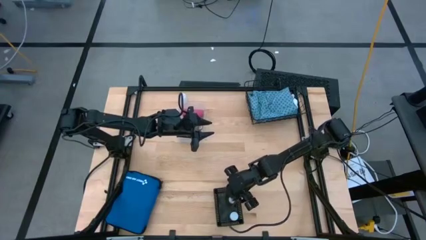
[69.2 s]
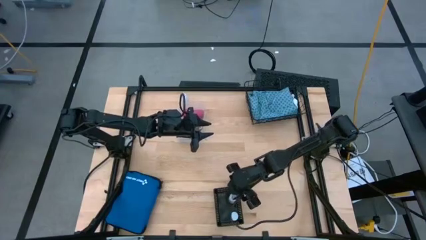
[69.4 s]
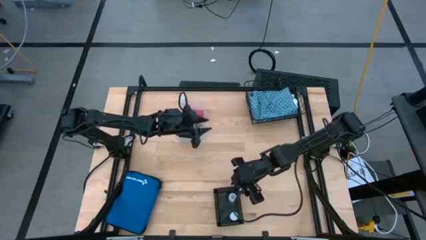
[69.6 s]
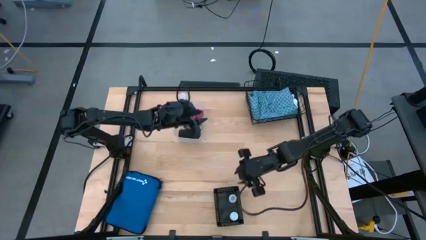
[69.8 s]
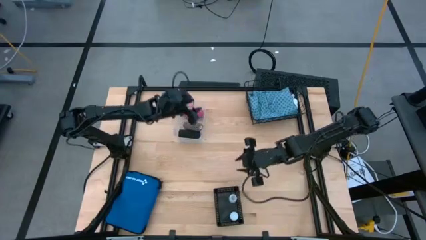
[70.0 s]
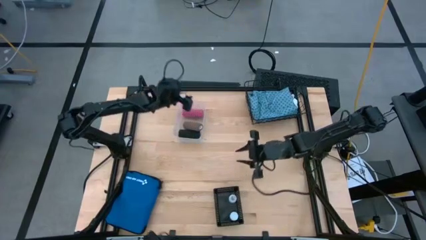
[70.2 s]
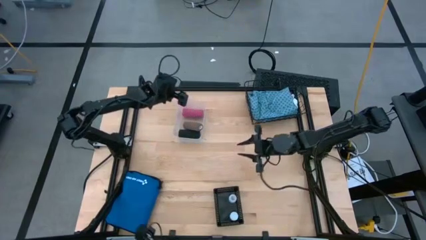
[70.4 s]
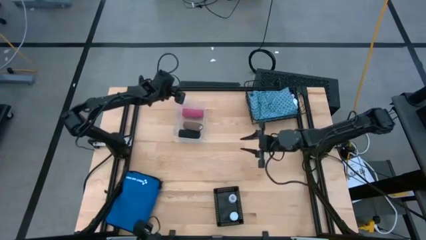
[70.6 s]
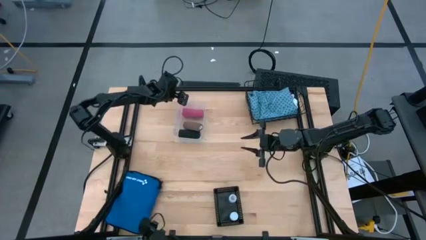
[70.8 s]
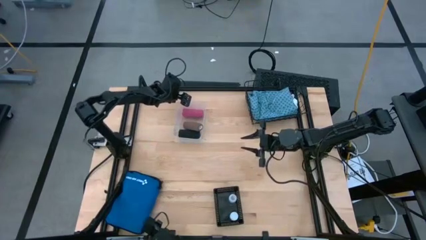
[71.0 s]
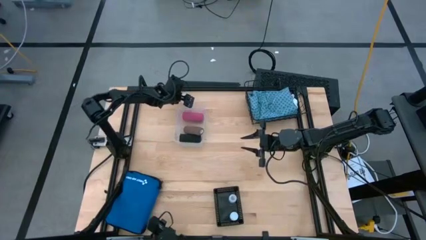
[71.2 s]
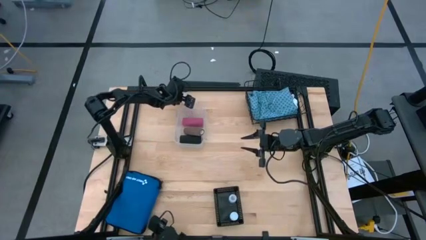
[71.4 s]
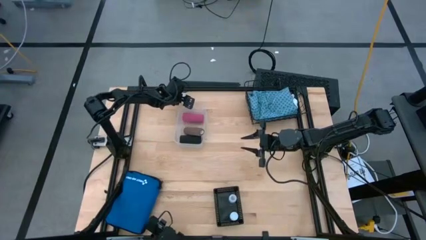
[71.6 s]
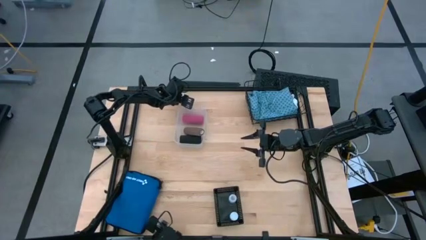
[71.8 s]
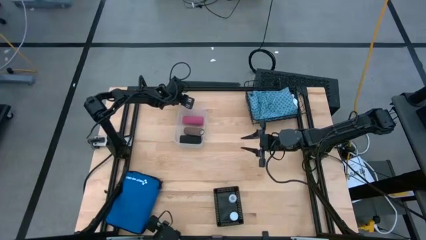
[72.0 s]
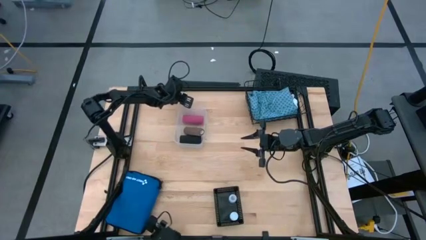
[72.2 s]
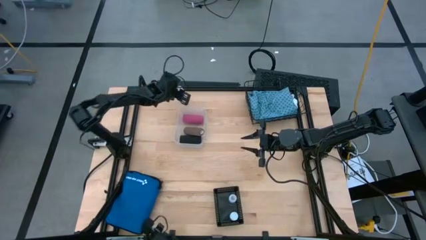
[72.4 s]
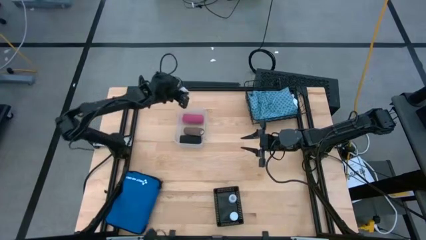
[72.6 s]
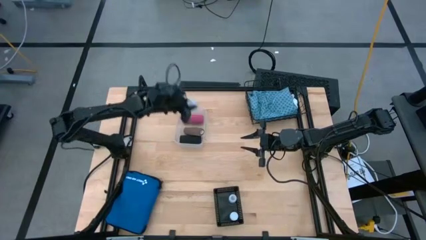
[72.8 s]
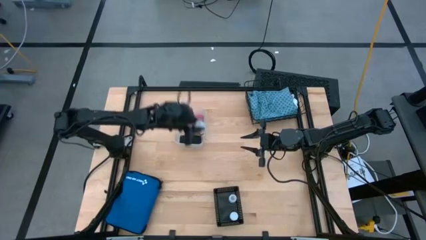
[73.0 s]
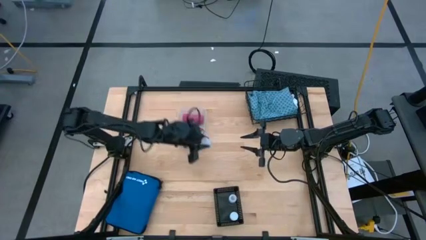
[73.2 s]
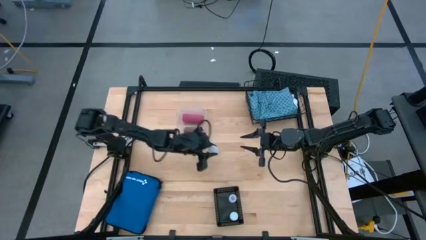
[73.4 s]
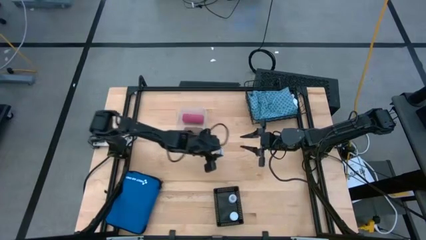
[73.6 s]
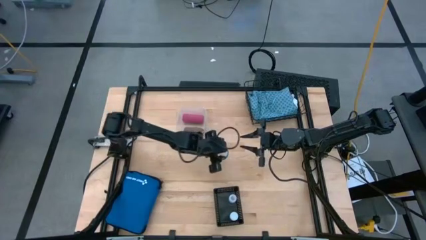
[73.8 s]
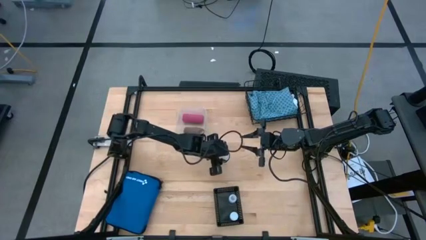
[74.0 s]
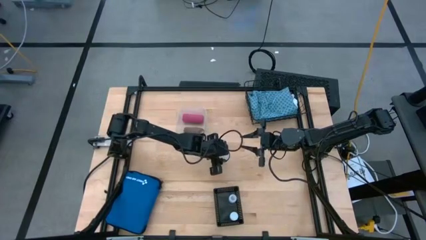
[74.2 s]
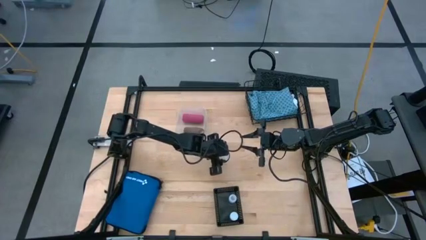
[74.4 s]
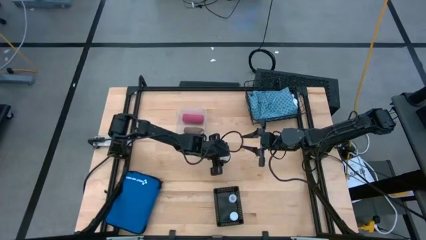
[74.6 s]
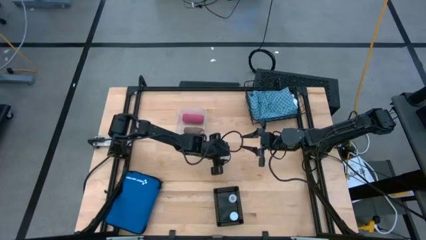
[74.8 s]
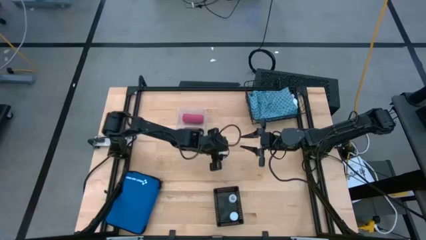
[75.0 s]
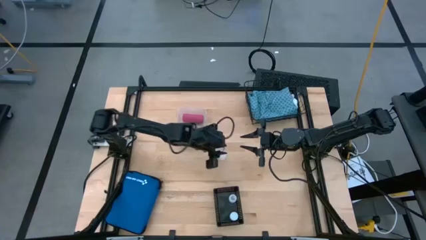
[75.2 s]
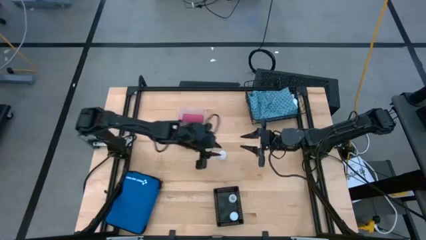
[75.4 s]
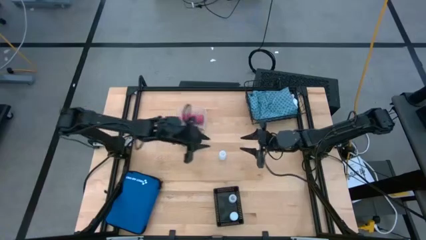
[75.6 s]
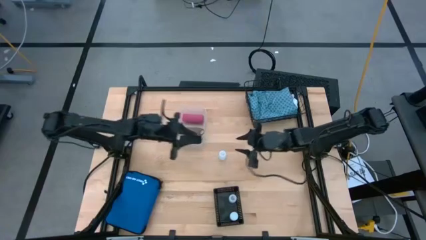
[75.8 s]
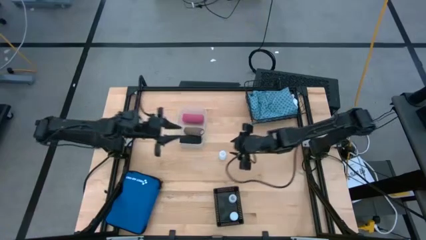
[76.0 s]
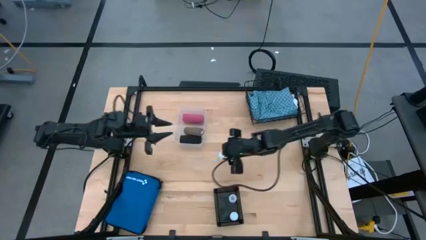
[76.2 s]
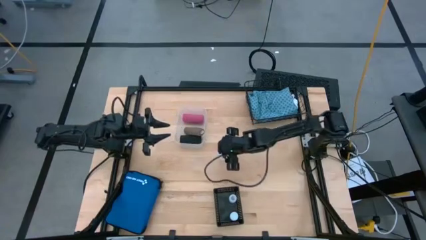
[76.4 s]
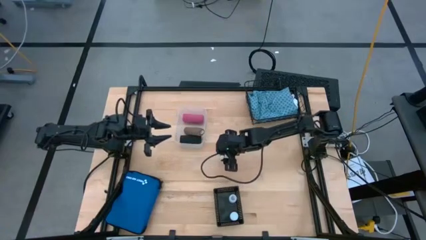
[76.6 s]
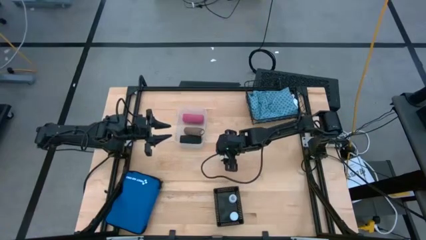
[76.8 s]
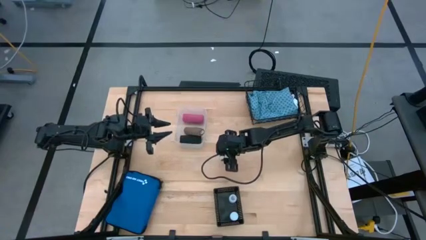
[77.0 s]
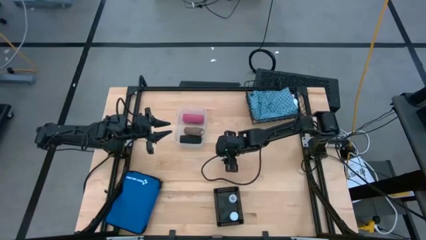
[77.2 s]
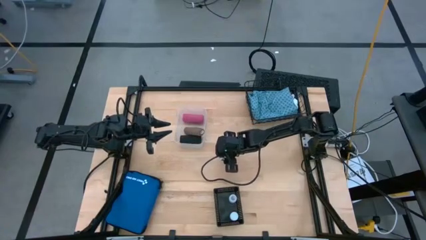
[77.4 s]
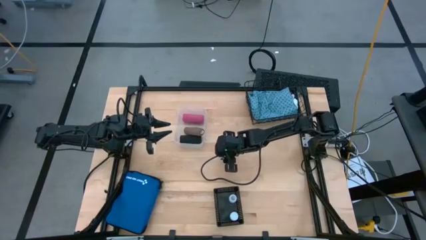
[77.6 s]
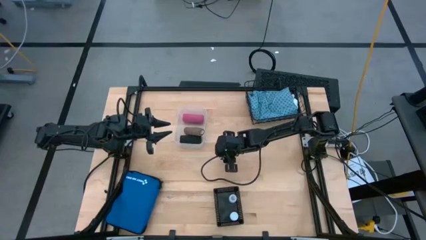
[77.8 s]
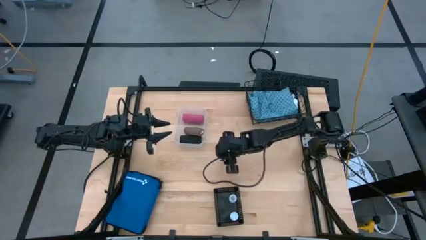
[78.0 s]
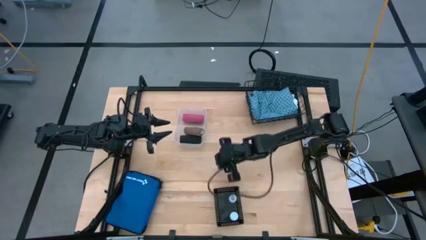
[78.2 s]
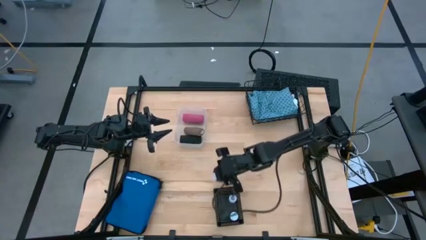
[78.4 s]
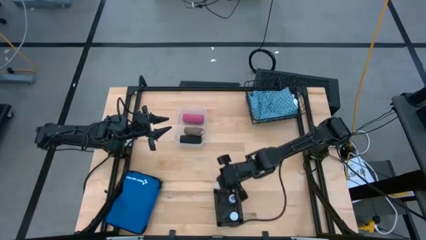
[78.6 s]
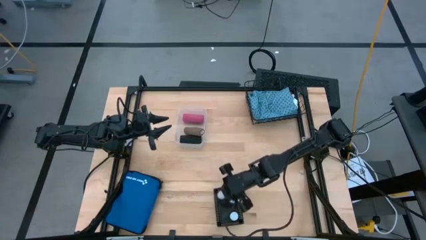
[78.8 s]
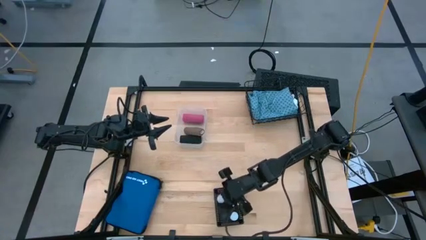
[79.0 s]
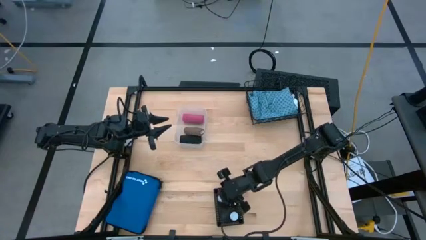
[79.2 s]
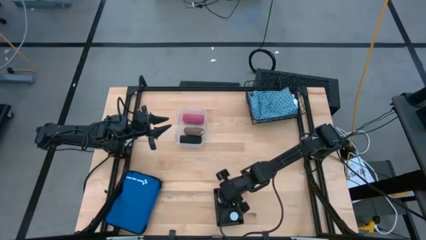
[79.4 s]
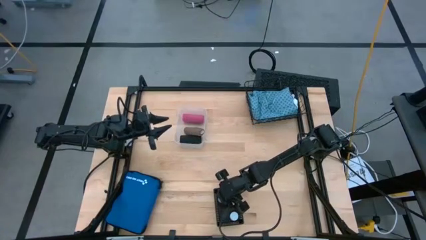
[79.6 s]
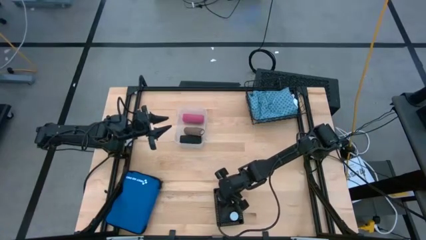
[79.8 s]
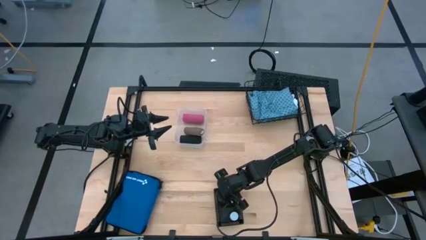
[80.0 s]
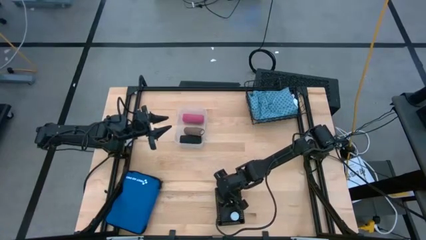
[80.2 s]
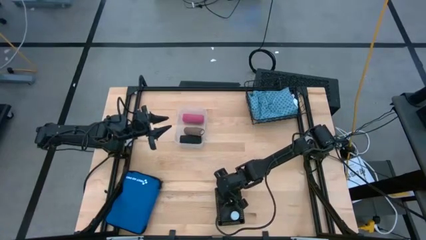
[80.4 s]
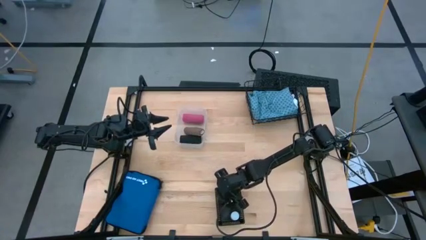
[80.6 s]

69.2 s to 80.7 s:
Task: Pick & Place Medicine items
Put the transparent pill bottle into the black bin
